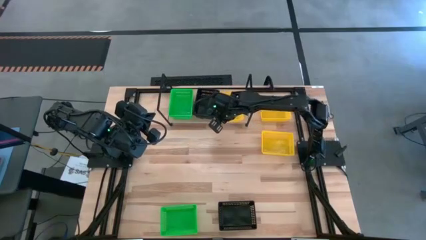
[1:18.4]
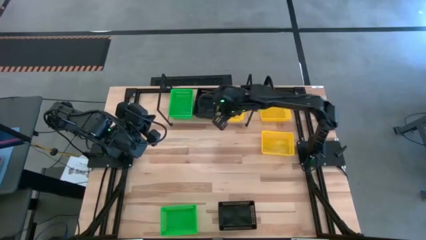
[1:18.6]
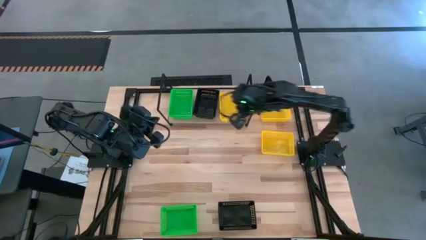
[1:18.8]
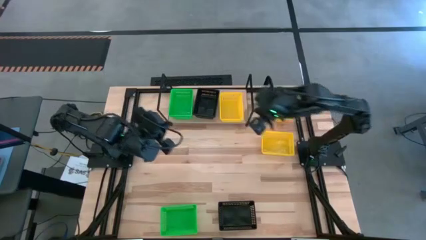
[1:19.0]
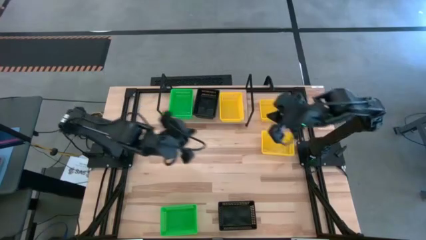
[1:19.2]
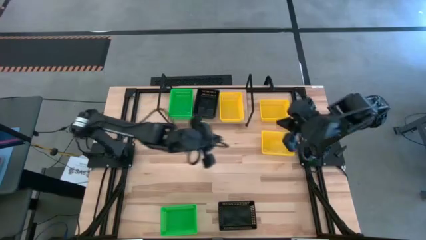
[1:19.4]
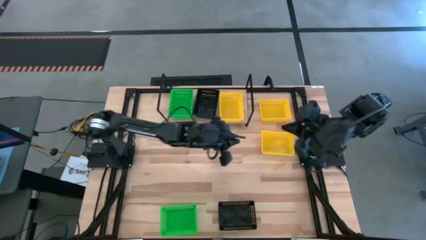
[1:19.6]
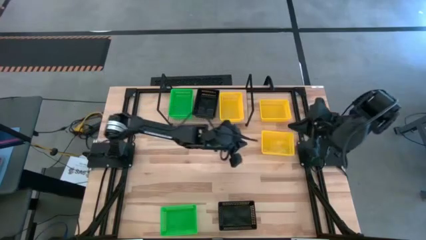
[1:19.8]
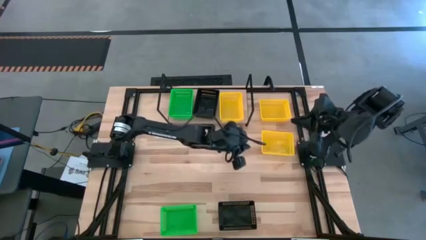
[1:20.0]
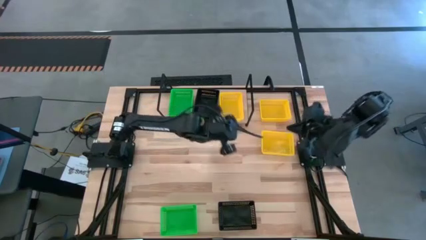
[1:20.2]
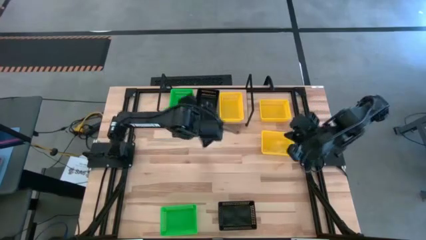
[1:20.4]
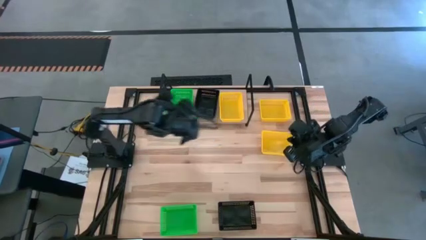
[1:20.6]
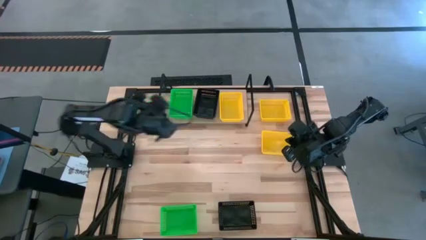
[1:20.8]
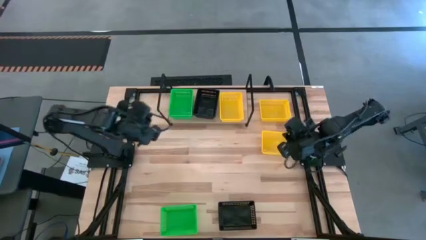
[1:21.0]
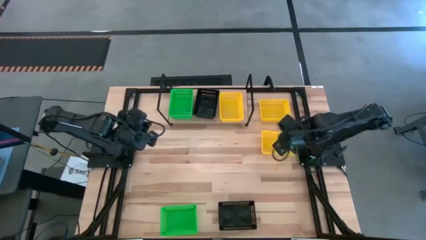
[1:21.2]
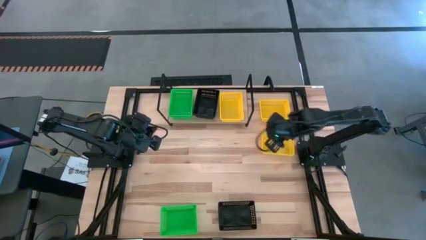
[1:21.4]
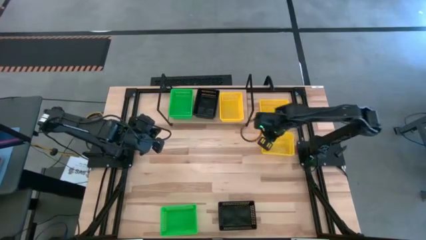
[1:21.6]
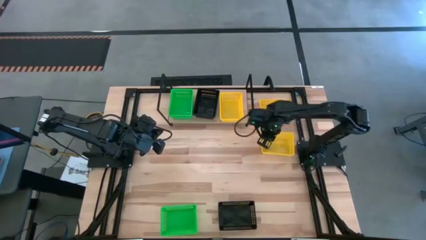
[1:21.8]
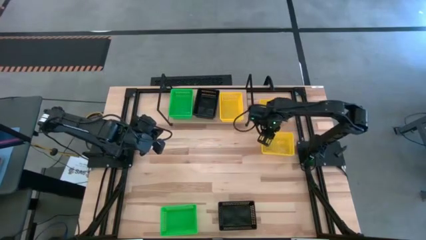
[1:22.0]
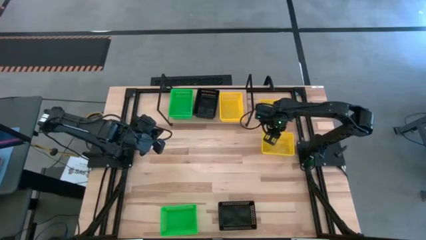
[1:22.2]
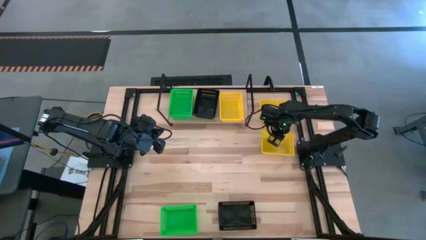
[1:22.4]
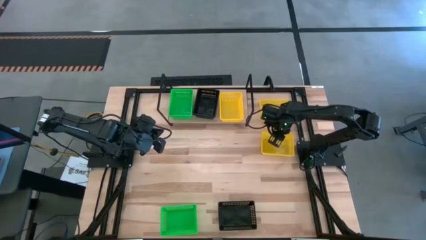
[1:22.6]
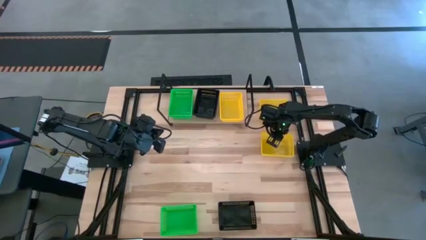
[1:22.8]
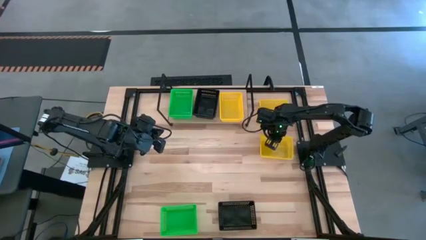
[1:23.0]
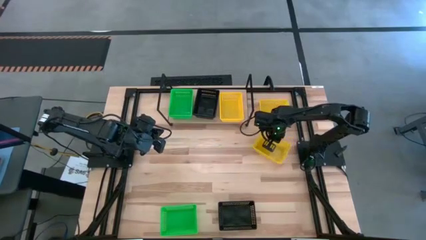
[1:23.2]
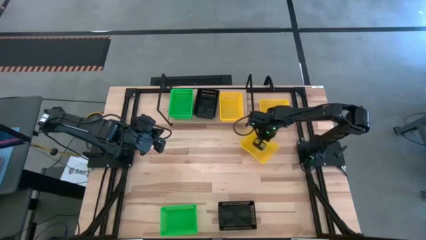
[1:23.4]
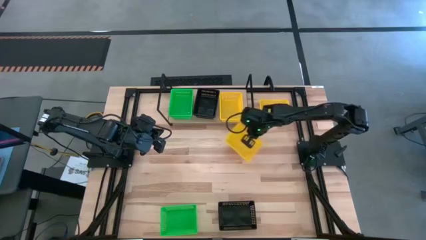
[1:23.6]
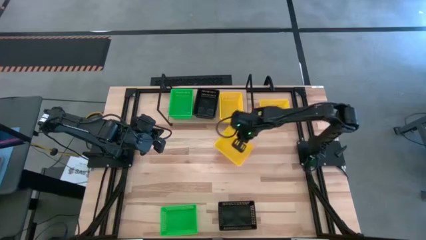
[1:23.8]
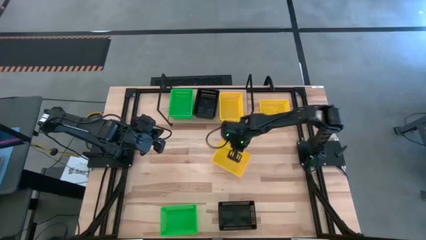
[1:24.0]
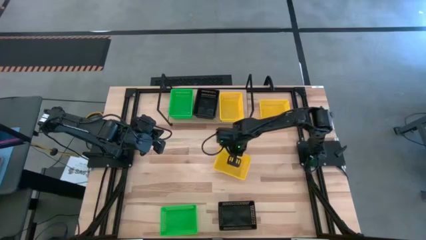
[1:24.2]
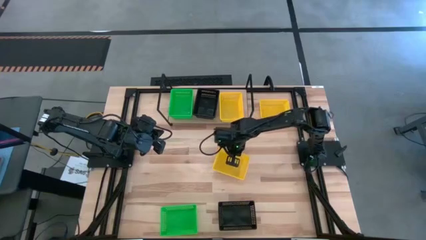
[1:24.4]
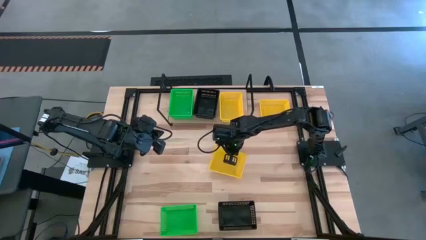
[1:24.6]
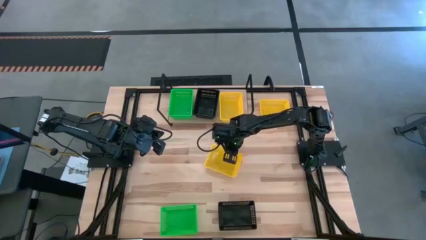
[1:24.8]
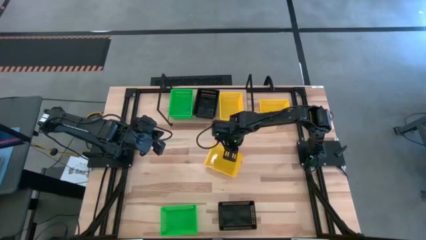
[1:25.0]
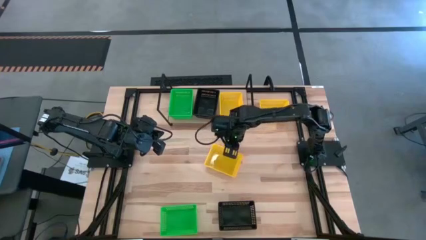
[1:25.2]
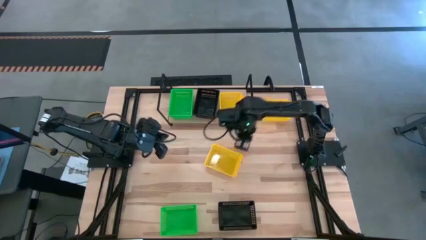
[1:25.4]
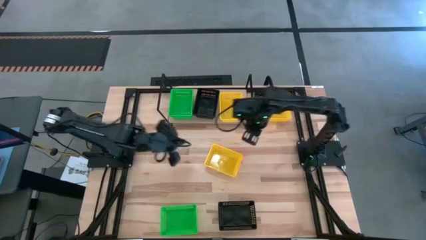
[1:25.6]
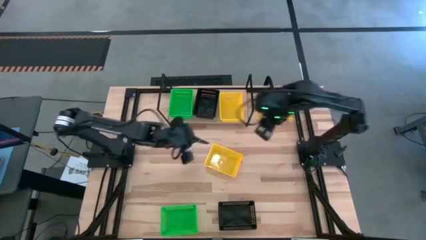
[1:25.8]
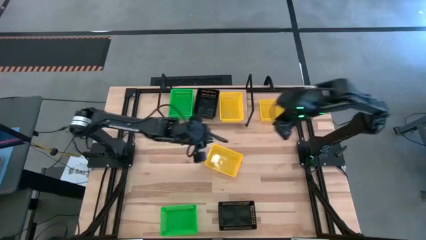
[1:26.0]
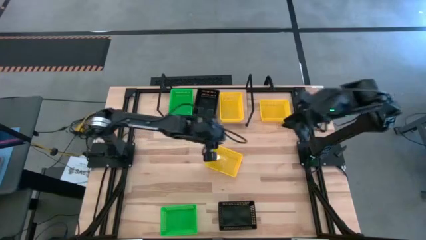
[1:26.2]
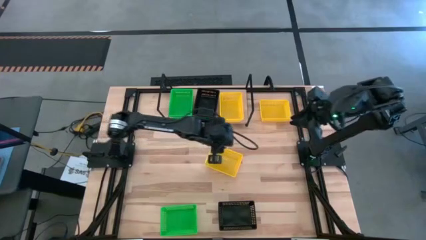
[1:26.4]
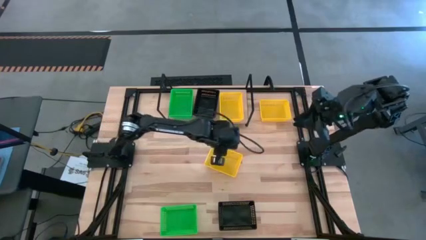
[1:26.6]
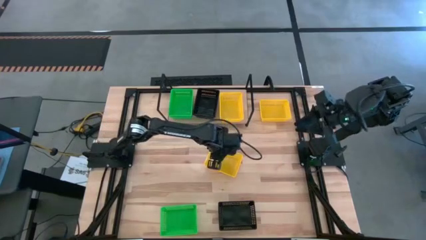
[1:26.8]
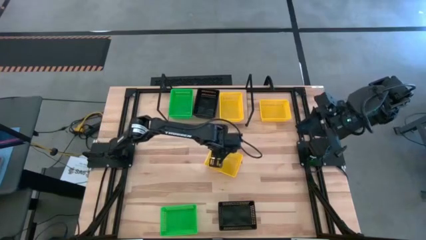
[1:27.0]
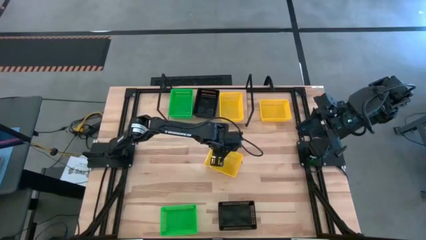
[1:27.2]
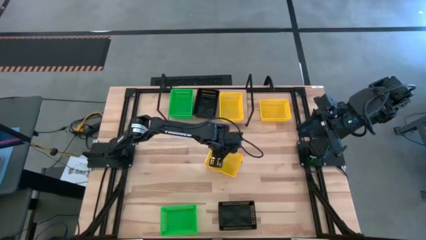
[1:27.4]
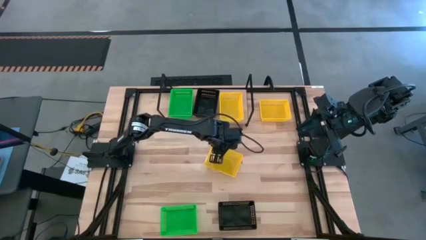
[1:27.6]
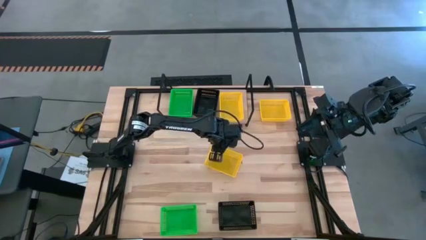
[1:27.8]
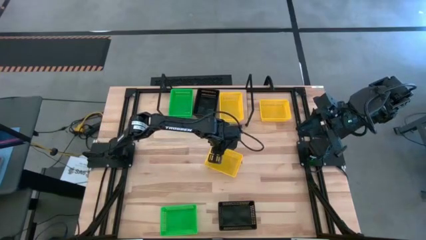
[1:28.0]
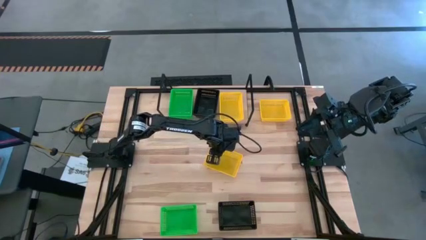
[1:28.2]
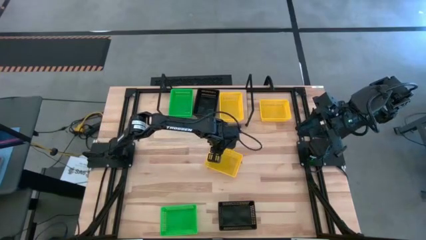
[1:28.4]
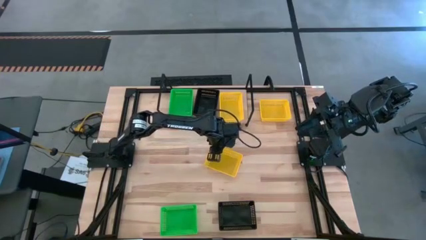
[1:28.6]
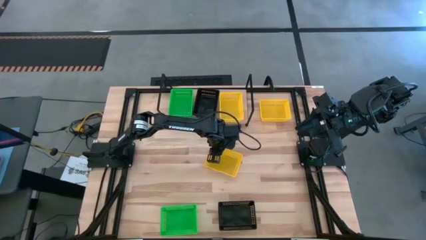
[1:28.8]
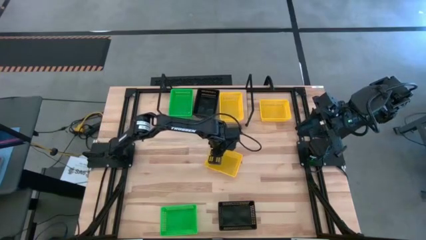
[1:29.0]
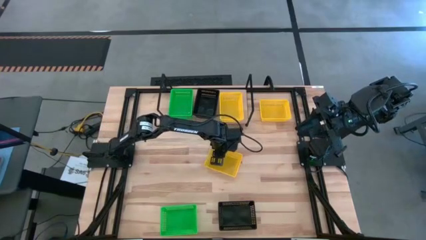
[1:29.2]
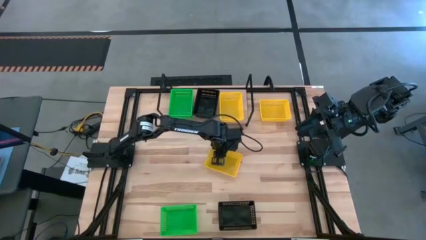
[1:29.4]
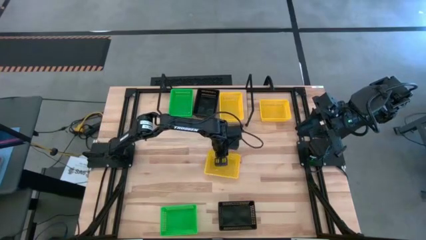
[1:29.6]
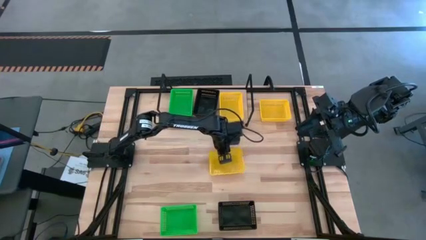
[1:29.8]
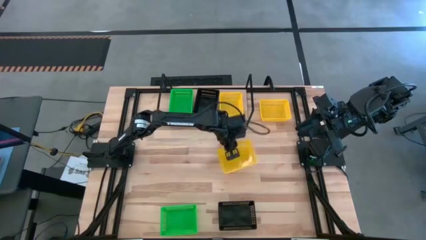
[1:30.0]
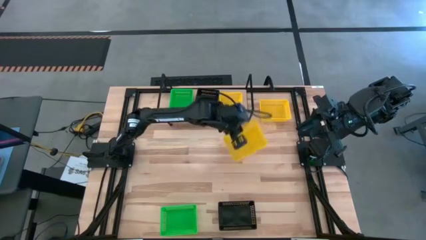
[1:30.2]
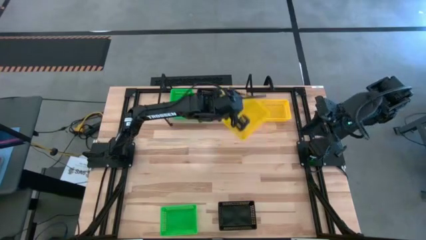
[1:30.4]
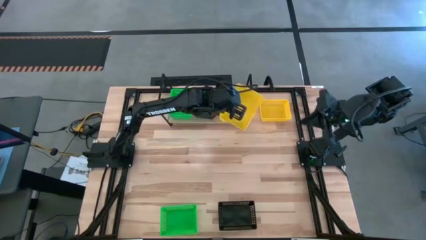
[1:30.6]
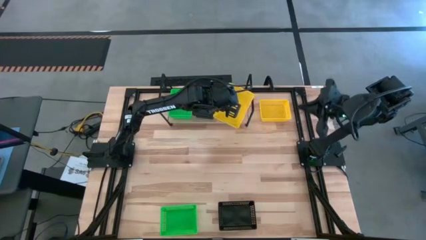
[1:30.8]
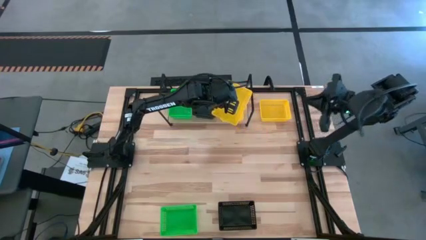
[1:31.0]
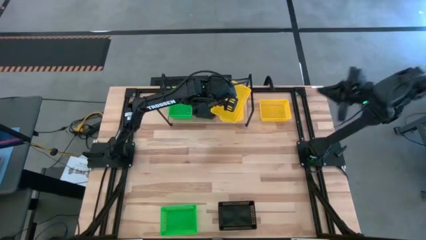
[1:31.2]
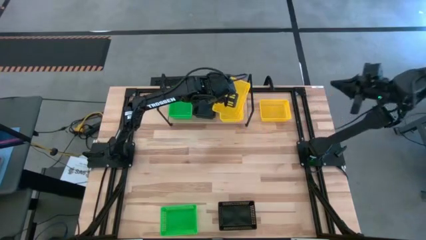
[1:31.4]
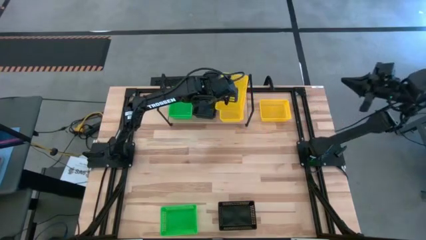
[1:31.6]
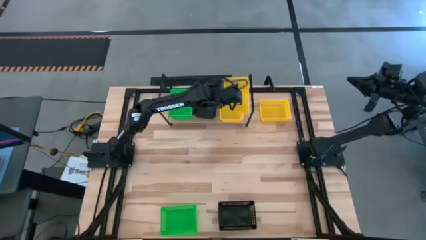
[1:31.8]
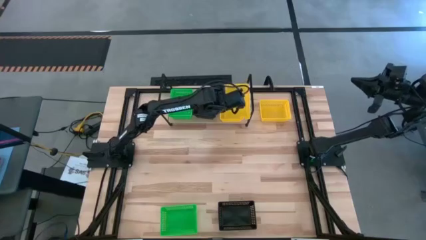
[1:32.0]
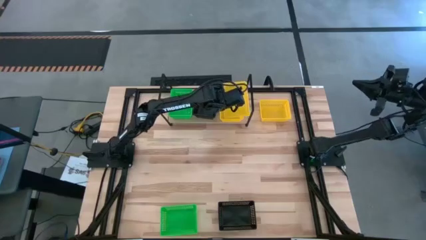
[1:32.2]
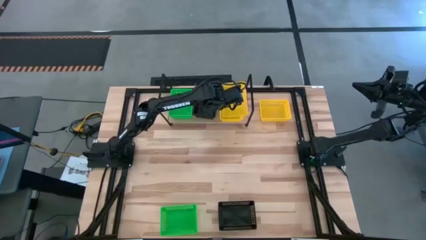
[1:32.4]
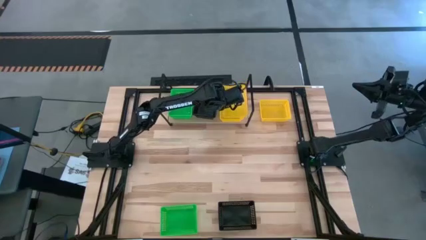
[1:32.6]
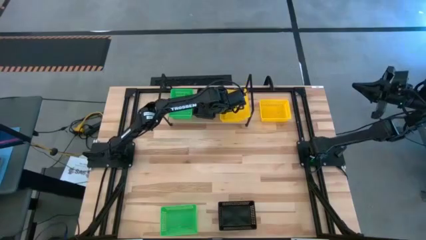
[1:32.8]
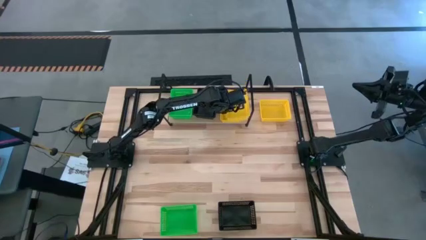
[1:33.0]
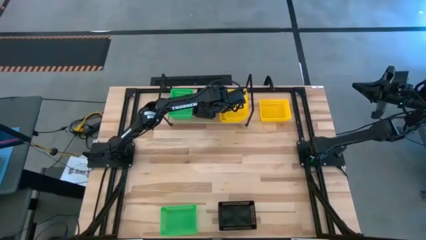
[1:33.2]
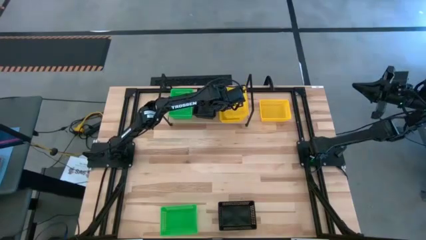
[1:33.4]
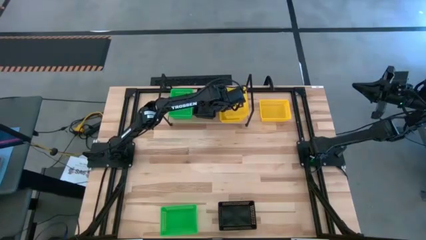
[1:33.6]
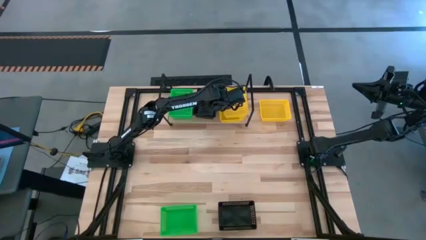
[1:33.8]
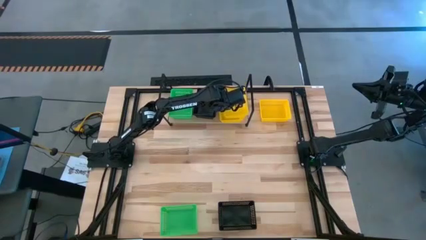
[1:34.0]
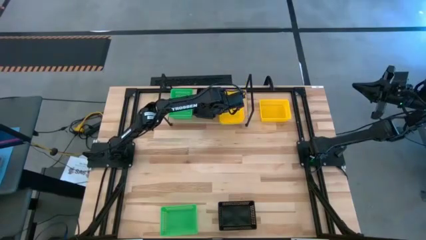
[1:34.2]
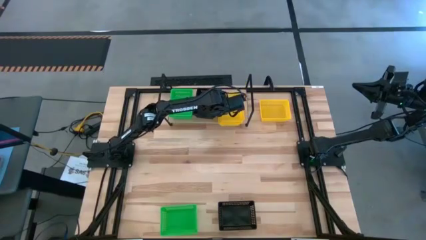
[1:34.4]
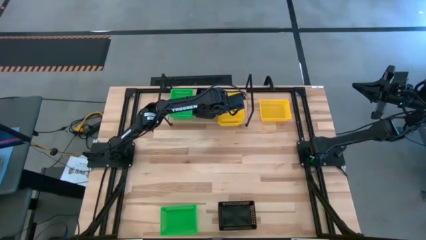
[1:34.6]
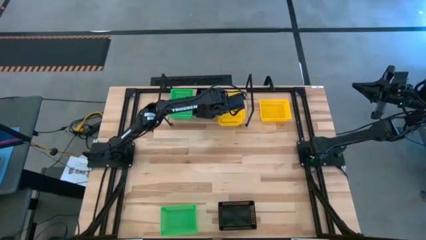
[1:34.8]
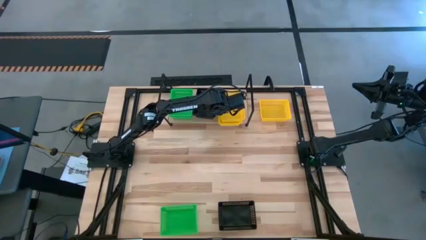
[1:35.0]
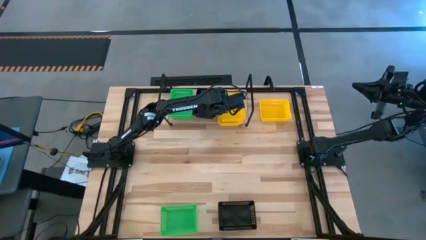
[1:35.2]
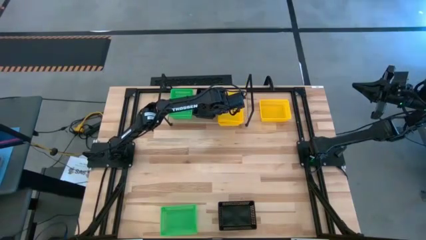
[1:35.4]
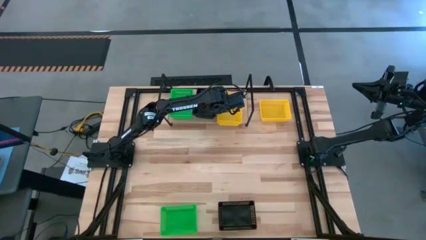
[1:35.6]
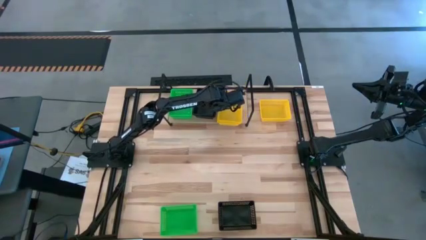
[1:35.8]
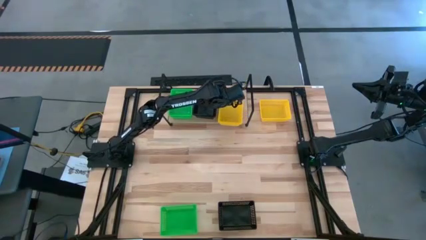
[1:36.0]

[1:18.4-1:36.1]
Task: Stack baskets on shelf by color
Stack the bottom yellow basket on top of the yellow basket on the shelf
